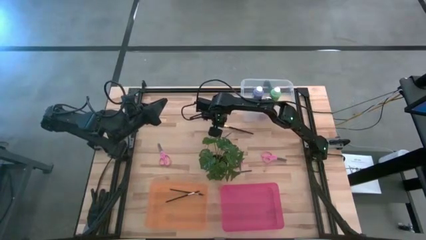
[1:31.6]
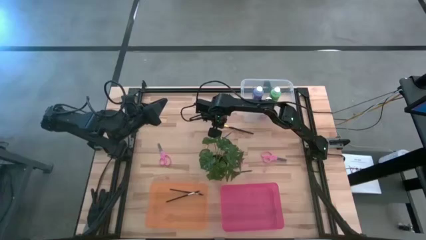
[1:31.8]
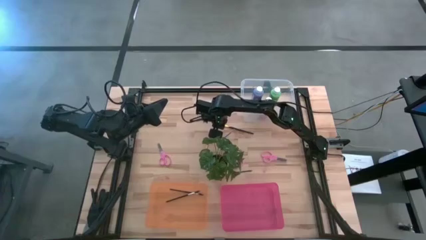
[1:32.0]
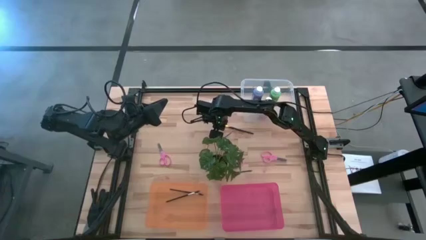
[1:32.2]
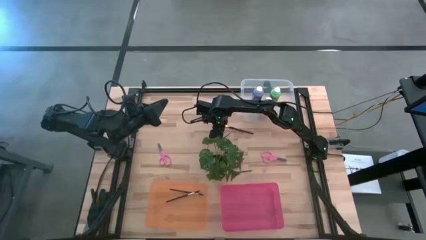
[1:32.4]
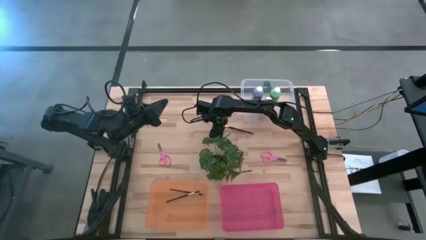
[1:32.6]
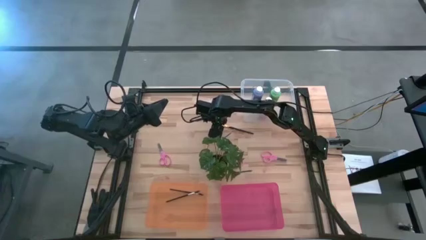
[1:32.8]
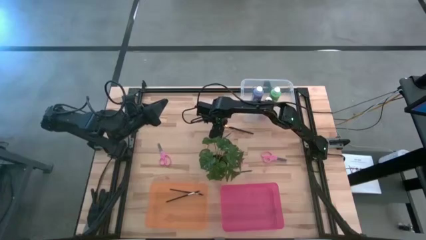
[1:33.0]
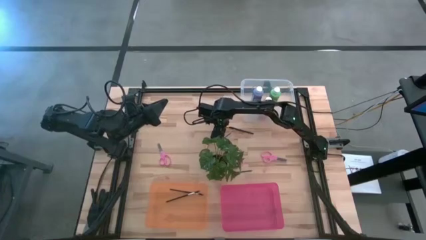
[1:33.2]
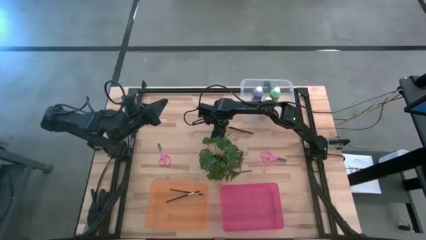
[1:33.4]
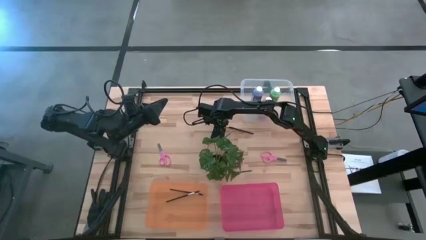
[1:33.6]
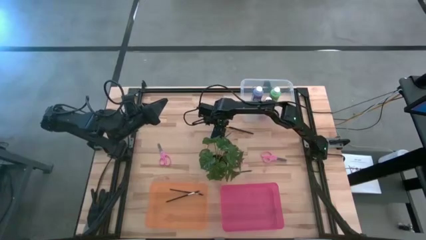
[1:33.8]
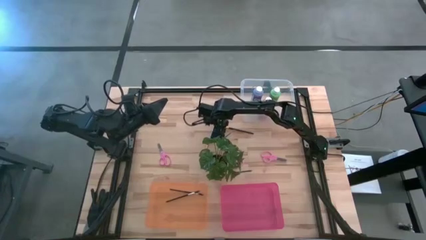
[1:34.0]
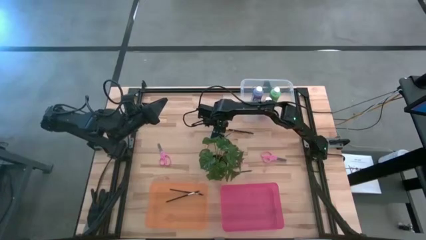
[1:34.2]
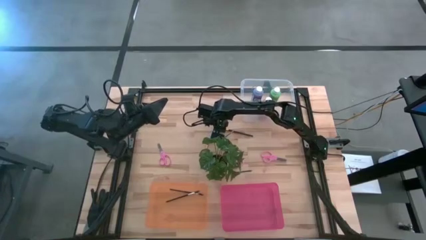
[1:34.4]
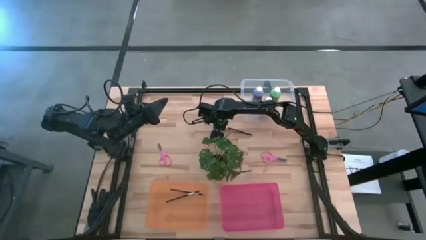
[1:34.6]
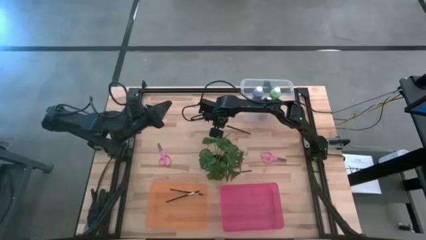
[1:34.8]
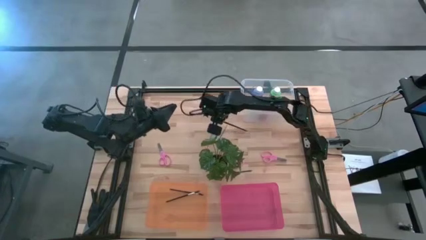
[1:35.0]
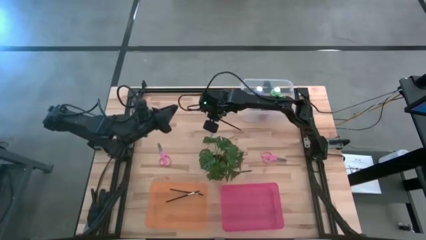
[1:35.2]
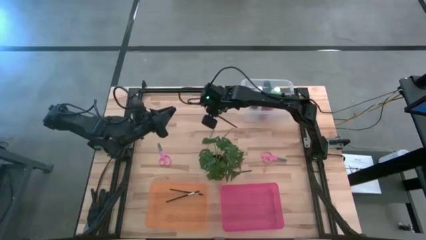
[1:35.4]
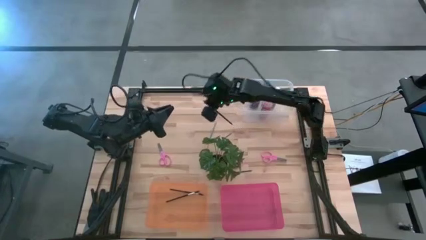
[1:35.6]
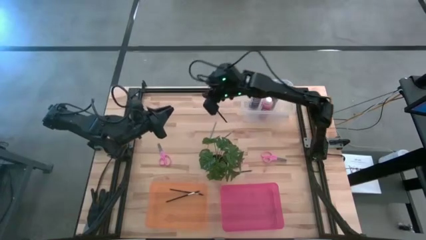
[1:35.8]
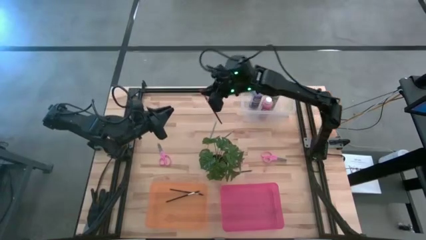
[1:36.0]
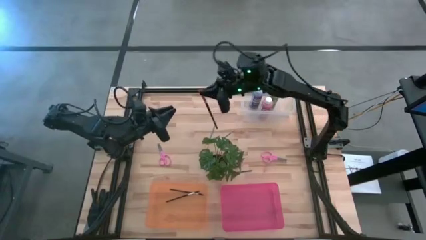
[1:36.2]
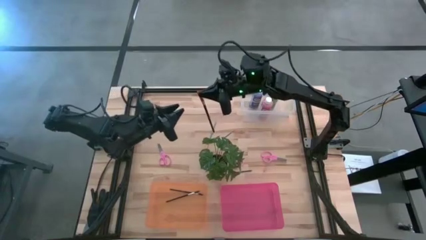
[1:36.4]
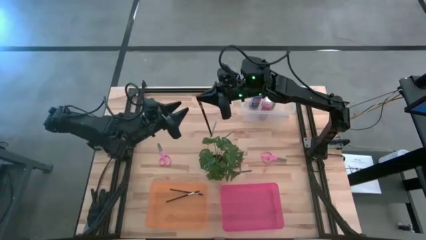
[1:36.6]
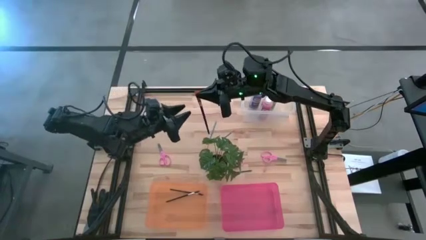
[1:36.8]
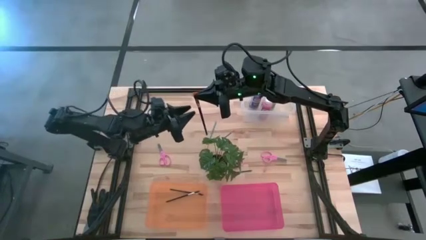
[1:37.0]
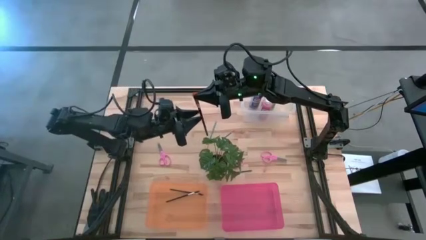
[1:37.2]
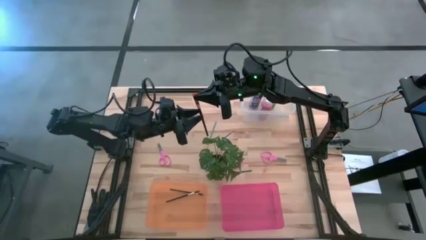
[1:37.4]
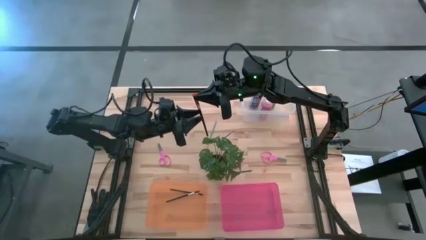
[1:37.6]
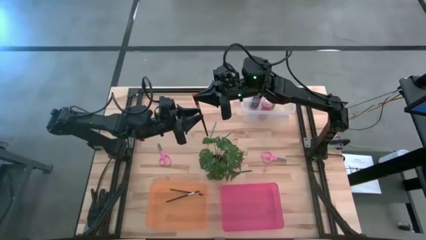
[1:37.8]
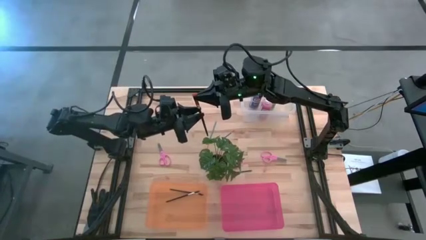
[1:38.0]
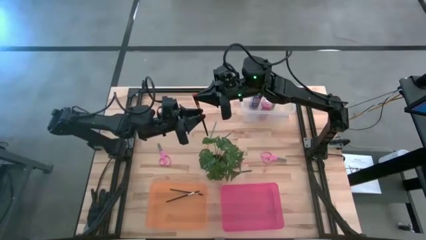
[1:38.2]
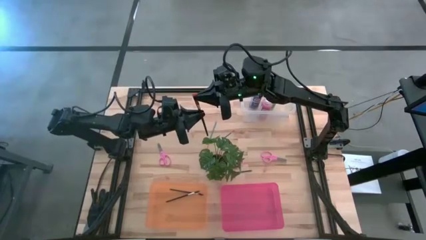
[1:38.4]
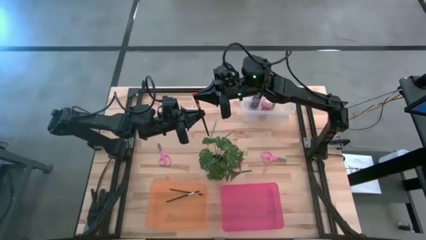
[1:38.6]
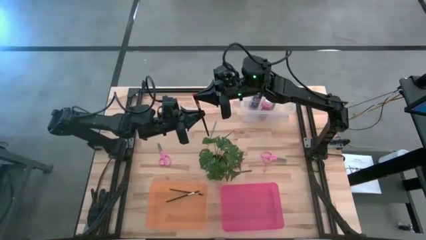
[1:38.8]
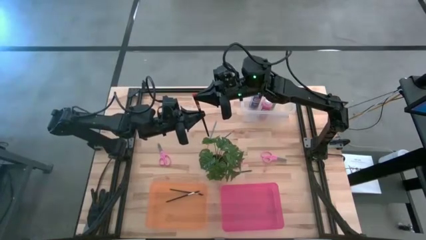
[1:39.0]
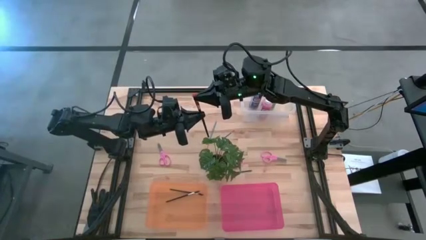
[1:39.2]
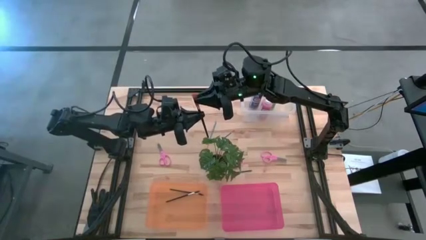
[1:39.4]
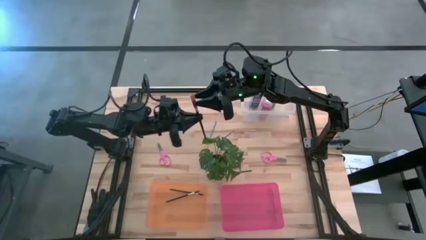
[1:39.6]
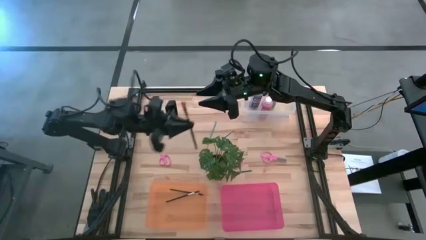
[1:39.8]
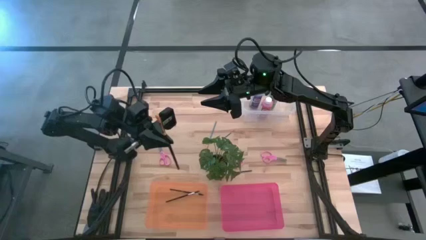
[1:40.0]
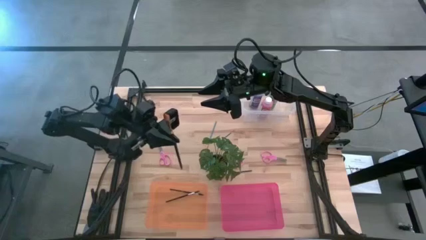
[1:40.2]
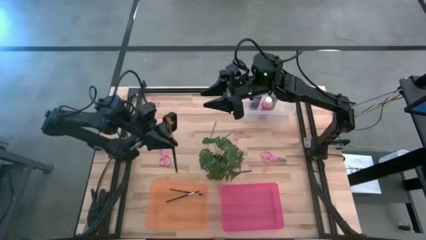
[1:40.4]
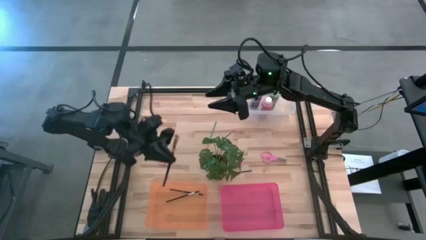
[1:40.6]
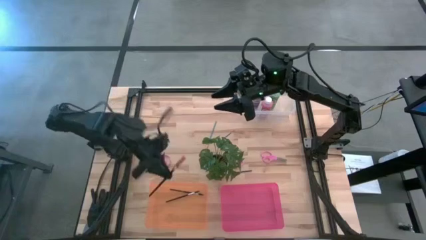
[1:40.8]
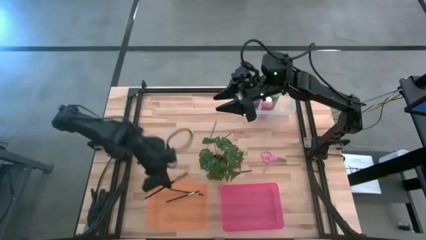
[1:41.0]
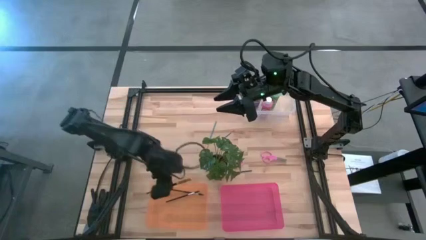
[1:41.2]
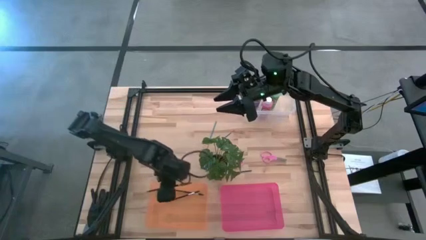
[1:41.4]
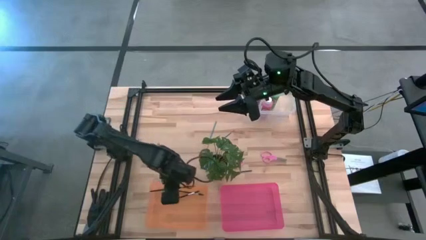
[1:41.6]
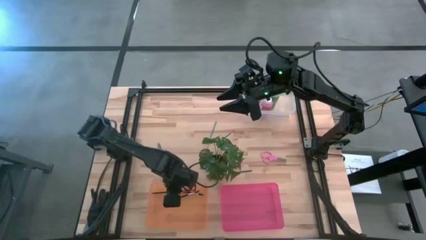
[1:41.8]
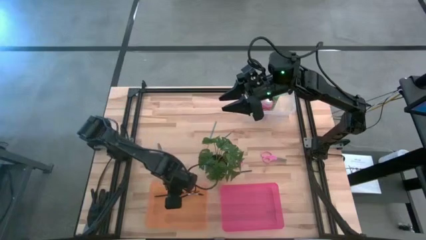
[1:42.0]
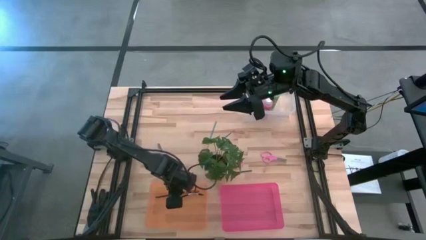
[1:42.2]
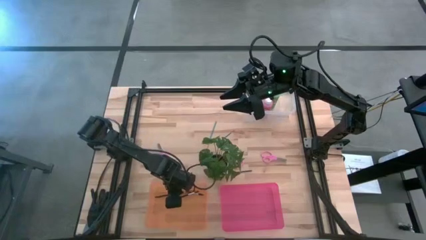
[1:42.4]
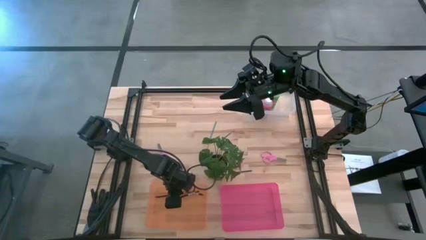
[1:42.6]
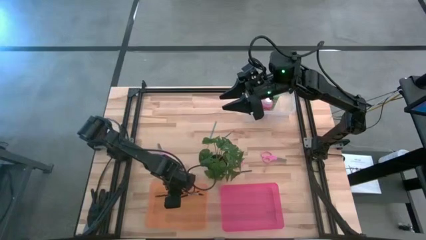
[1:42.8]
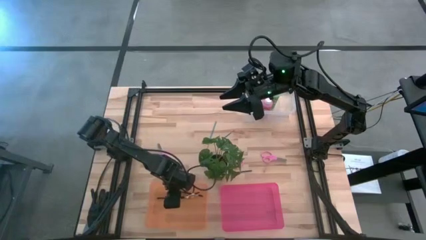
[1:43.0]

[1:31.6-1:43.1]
Task: Pick & Place Paint Supplies
Put the black paint brush into the orange bin
